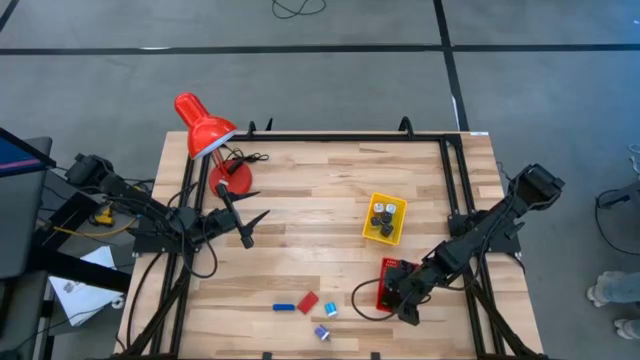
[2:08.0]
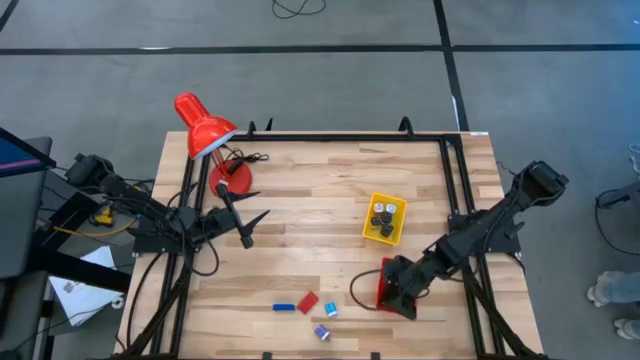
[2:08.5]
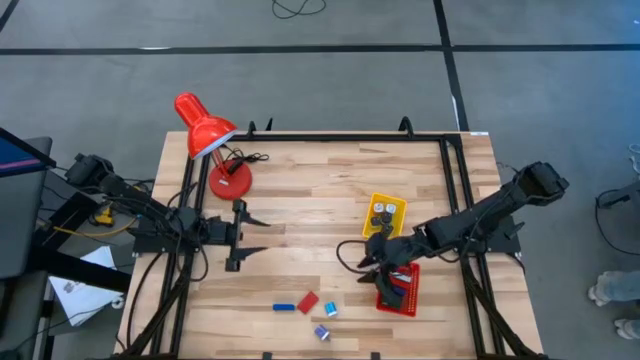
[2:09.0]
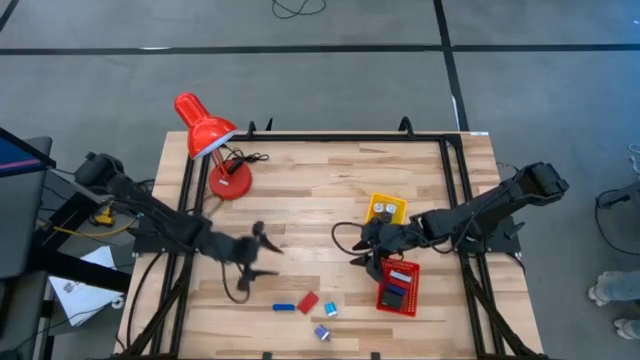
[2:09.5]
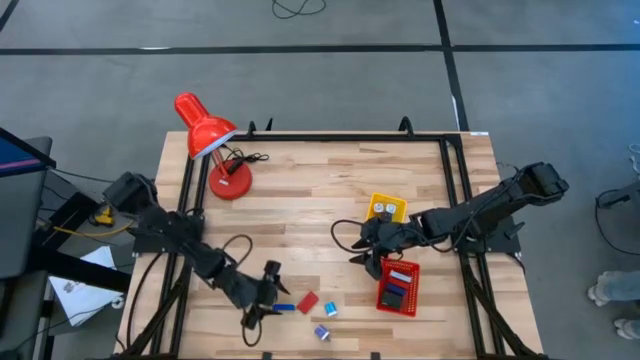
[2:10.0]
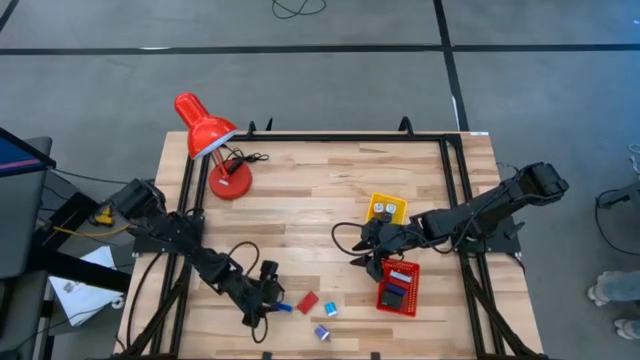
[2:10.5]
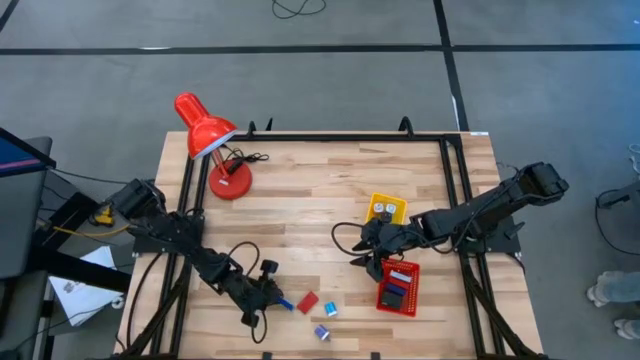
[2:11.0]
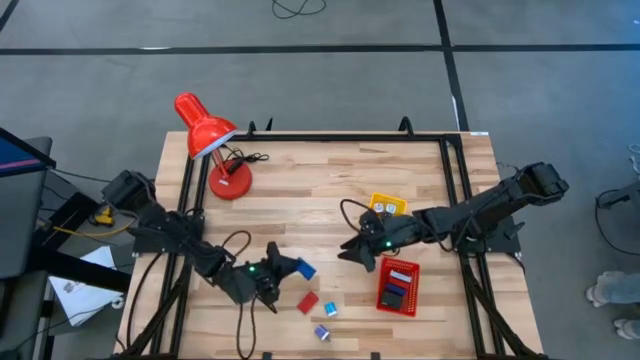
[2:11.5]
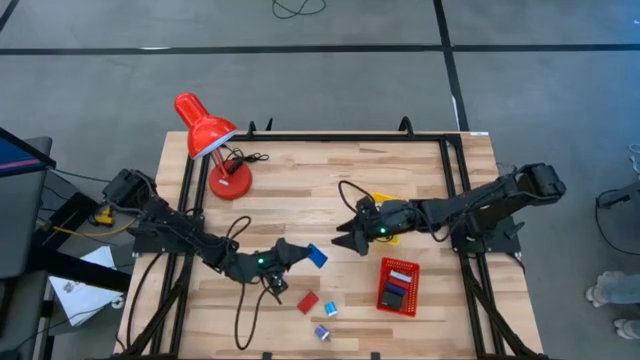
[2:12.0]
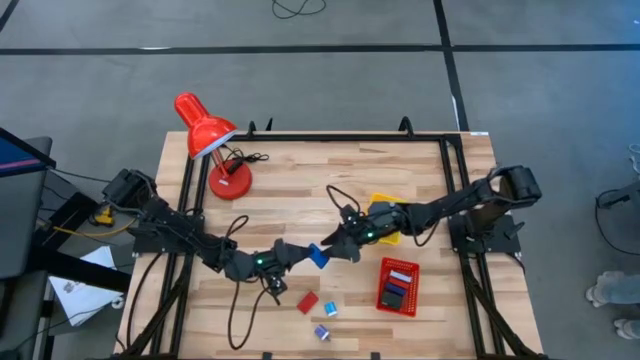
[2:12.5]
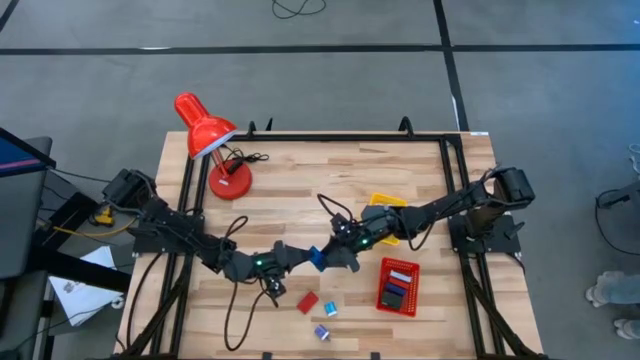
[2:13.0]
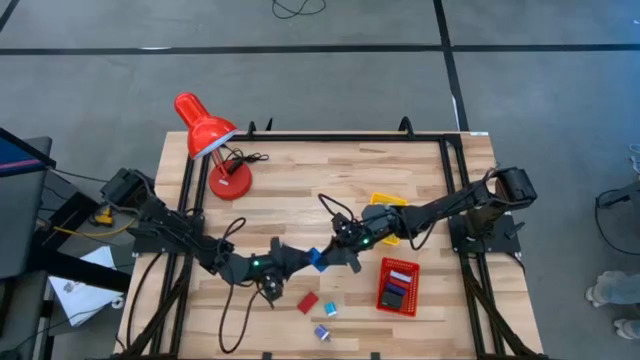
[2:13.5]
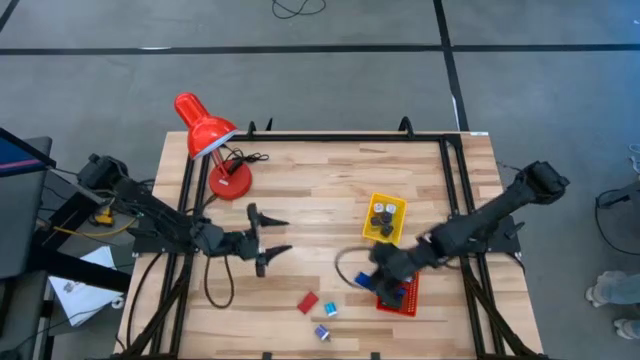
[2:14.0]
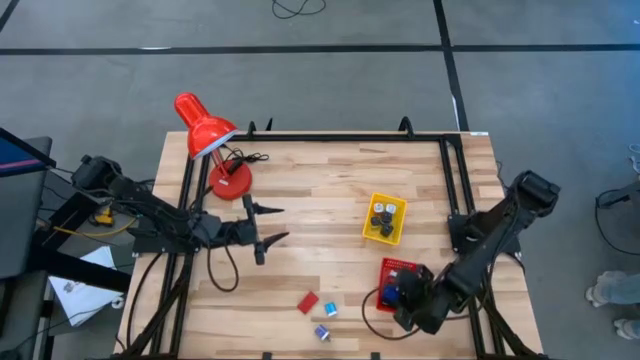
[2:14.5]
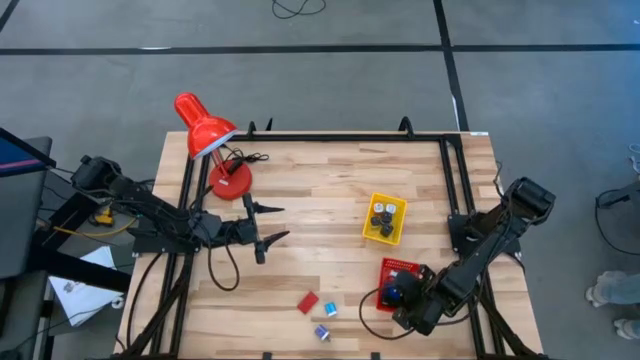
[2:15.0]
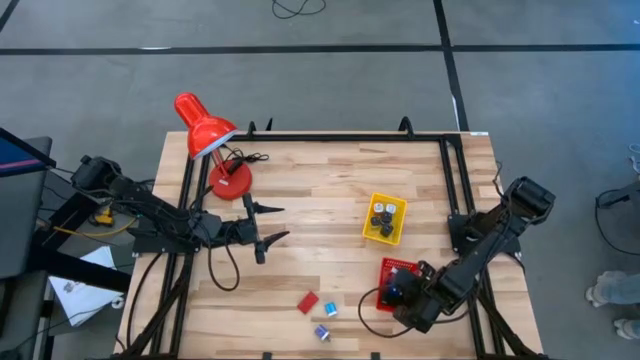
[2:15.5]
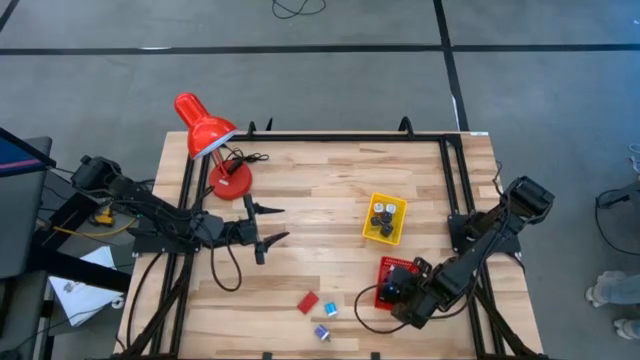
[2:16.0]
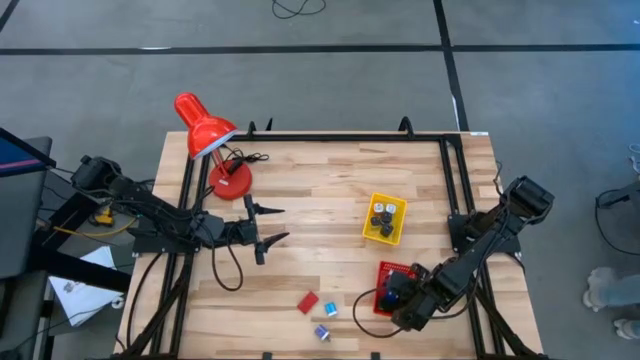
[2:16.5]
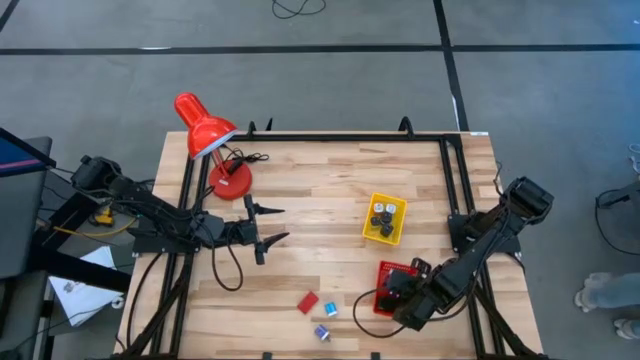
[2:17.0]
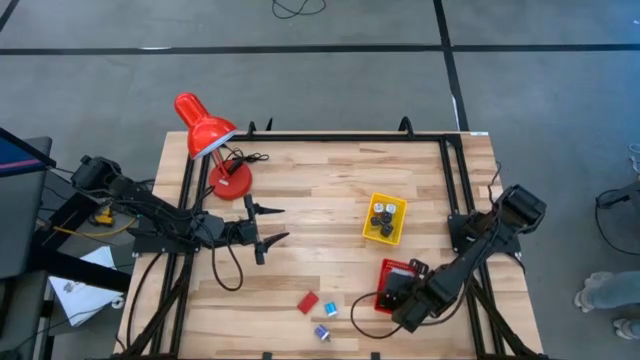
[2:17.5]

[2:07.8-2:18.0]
Task: Pick & Place Office items
Put the blue digital timer into the red bin

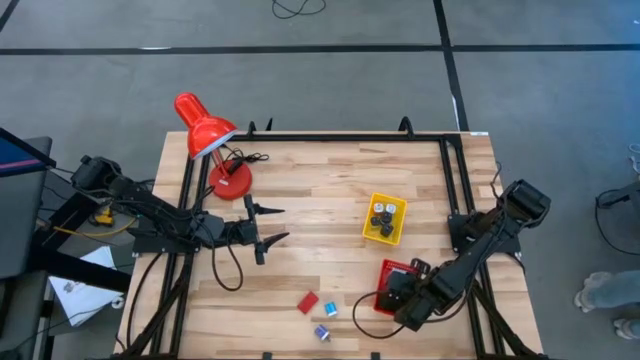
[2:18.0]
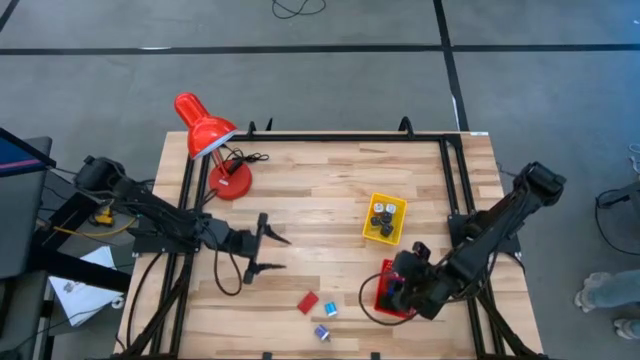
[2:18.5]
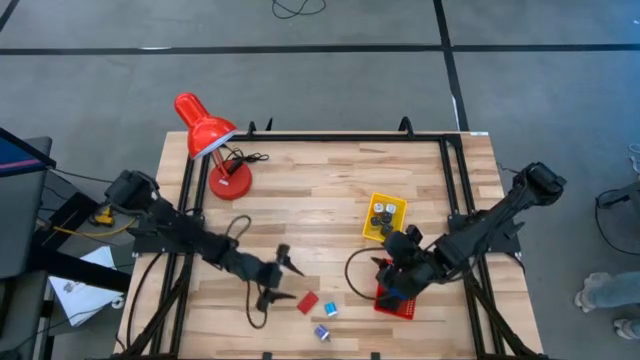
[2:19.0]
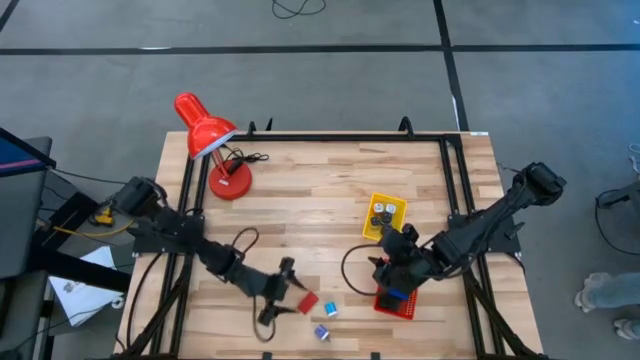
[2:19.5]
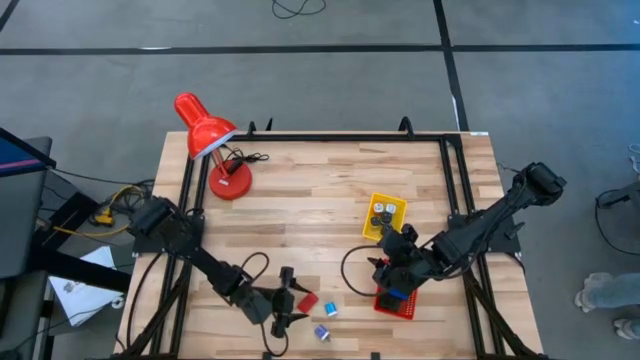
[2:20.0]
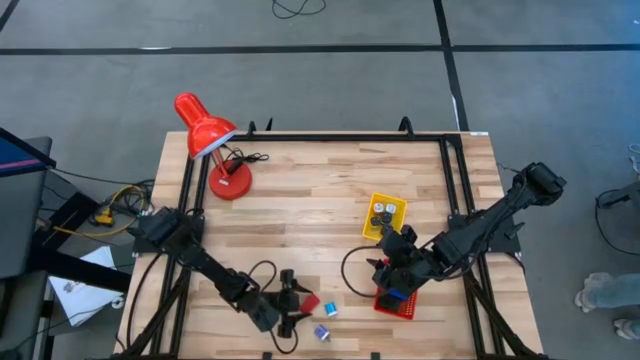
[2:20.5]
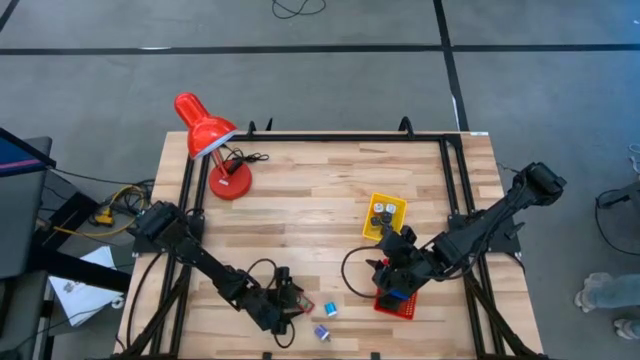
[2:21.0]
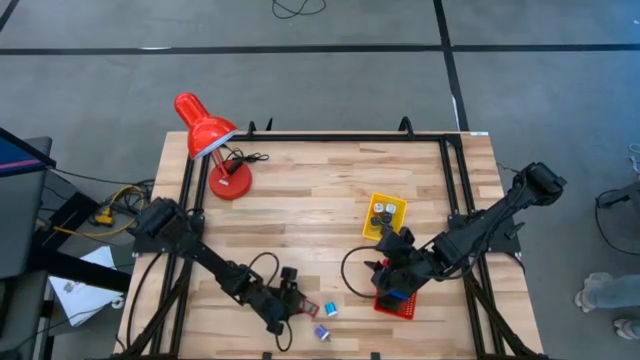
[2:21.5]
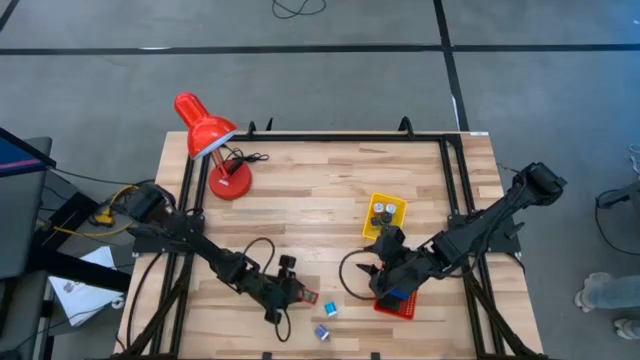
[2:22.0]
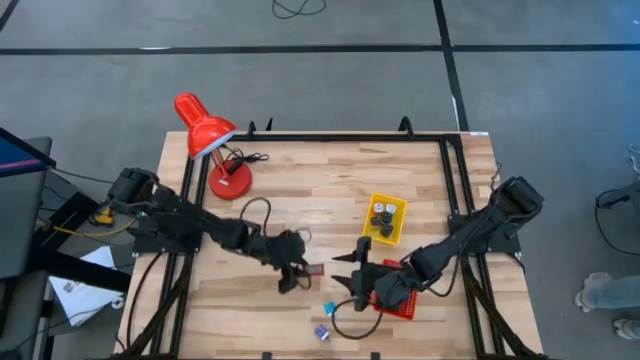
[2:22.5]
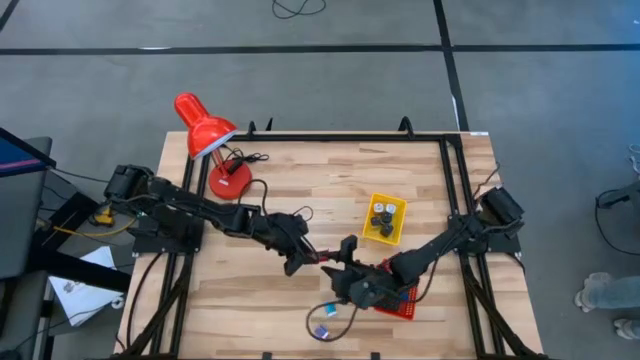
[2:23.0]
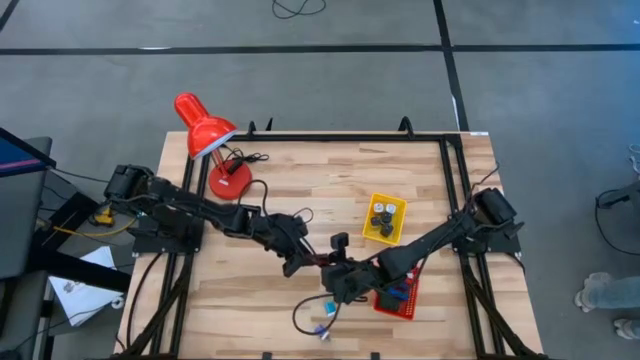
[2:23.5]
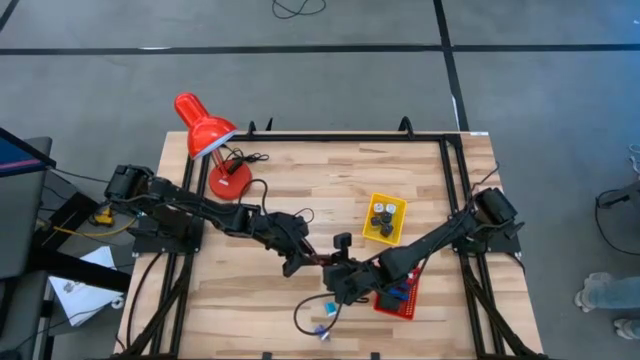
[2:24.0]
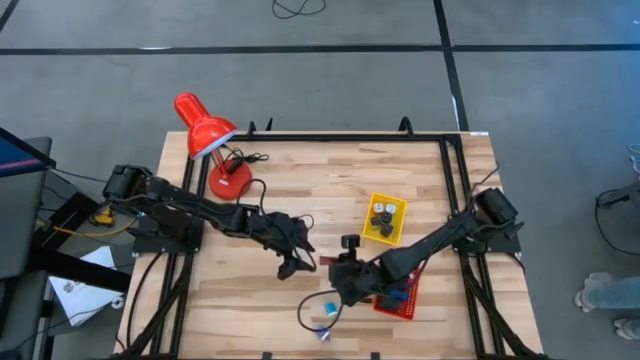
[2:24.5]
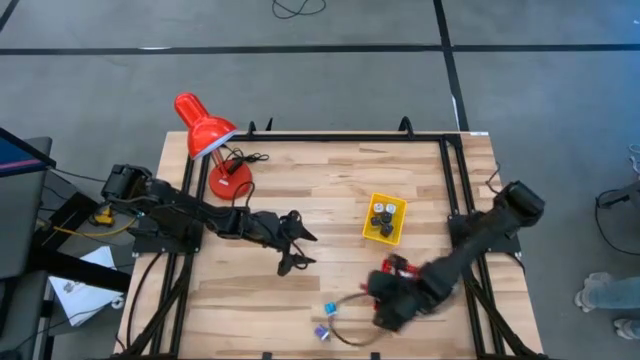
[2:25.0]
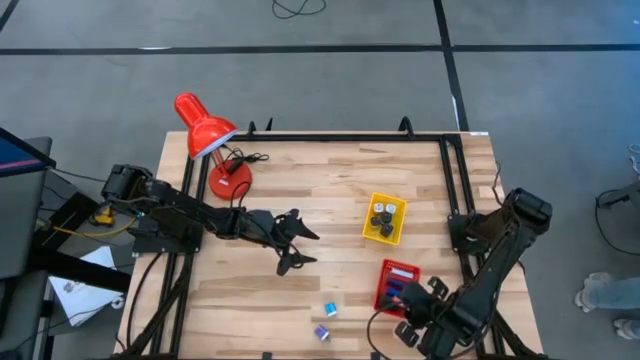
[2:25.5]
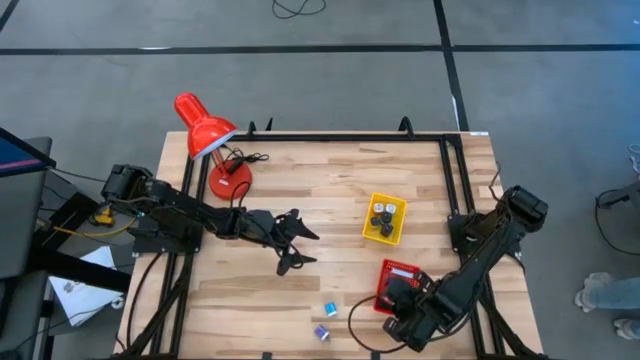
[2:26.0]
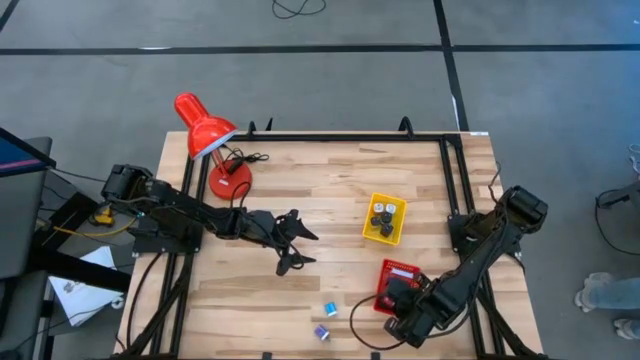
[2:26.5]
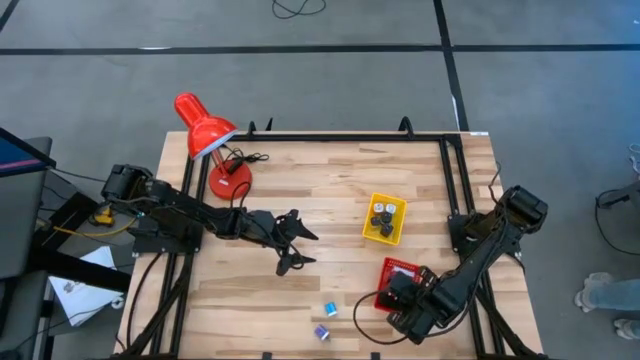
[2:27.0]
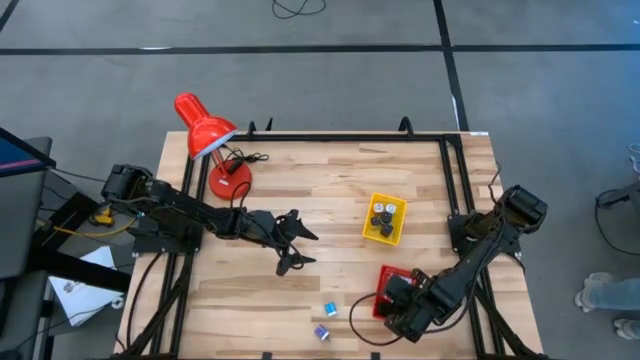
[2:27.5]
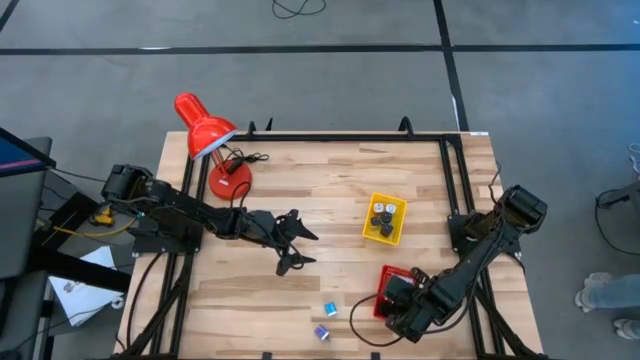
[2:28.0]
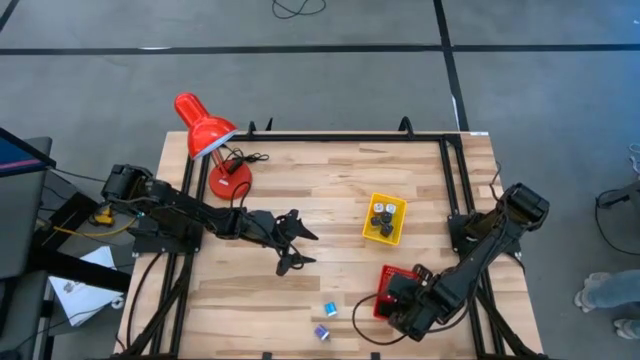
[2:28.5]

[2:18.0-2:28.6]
Put the red digital timer into the red bin

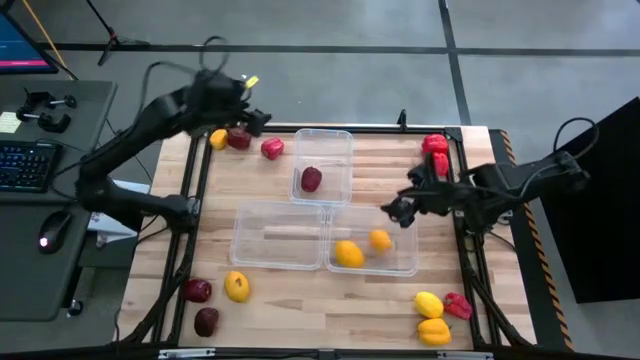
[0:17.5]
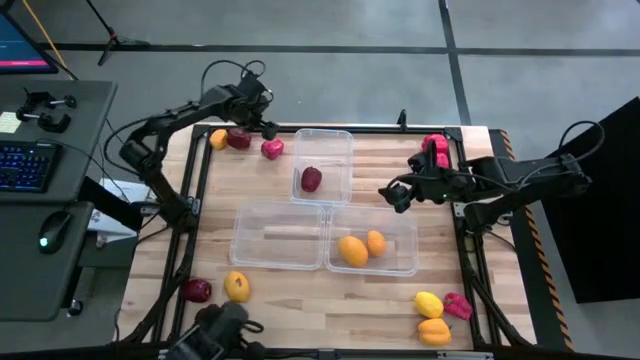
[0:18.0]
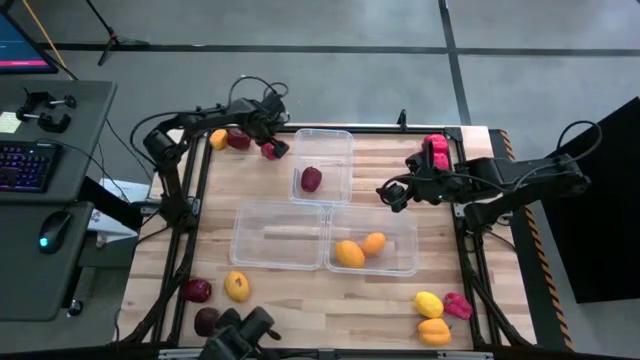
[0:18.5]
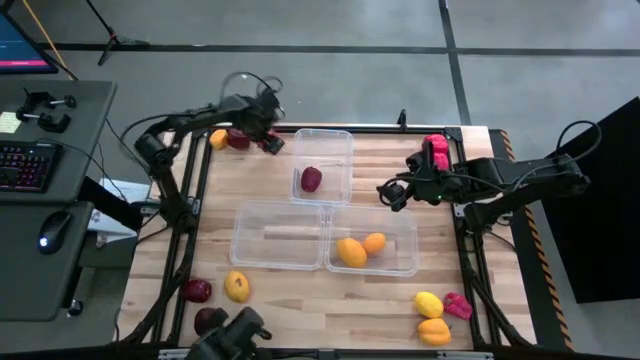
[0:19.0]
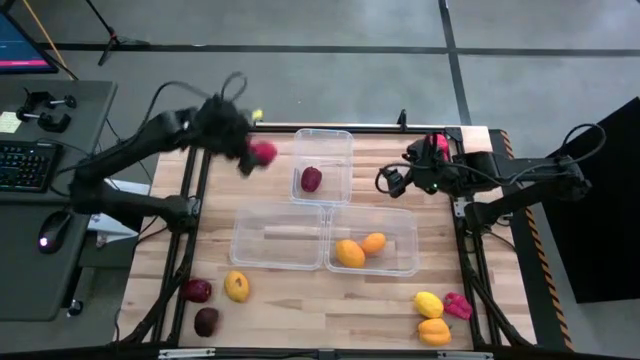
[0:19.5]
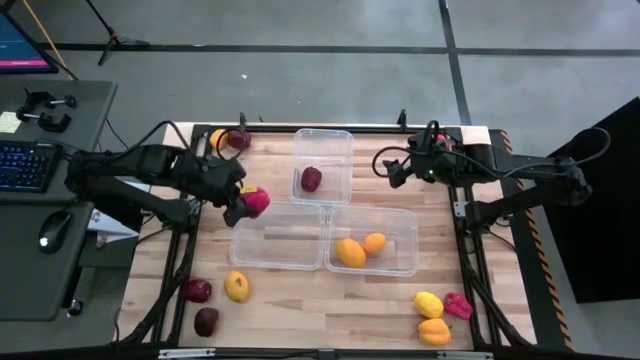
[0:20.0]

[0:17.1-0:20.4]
Task: Sort produce into baskets
Put the red bell pepper into the middle left transparent bin
